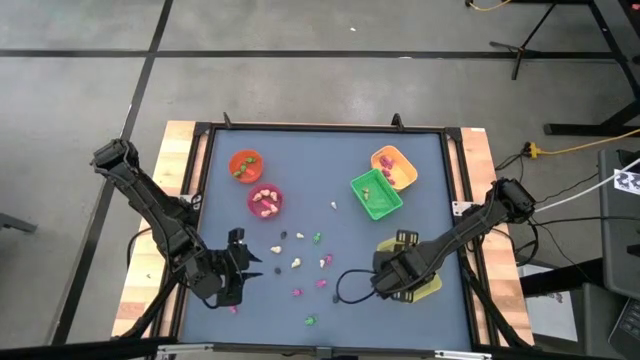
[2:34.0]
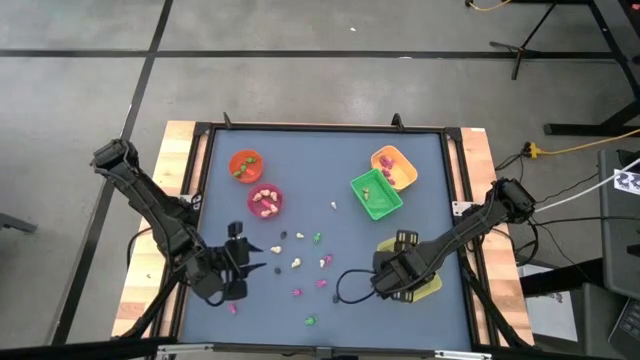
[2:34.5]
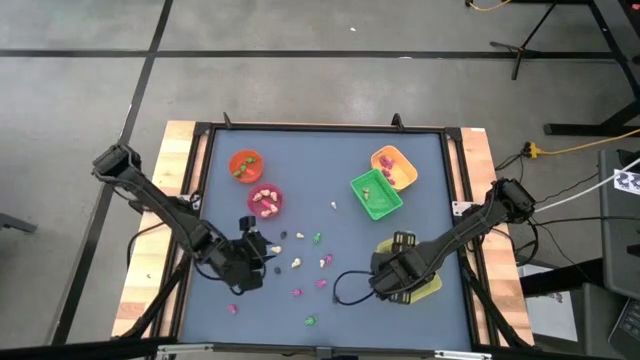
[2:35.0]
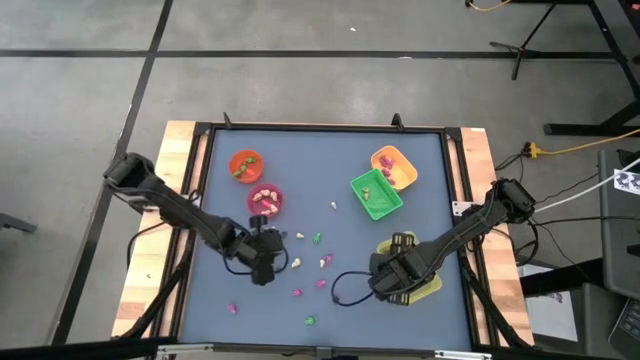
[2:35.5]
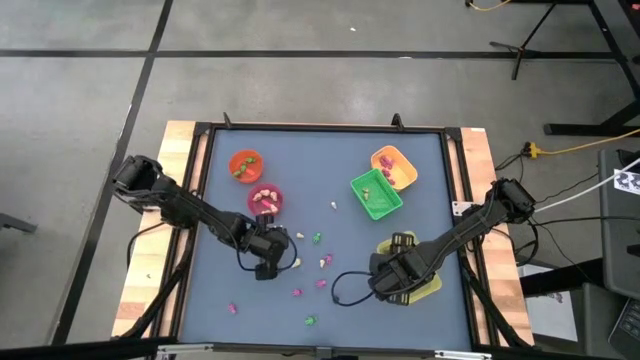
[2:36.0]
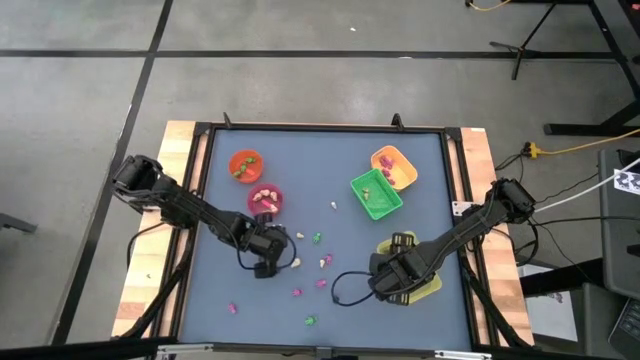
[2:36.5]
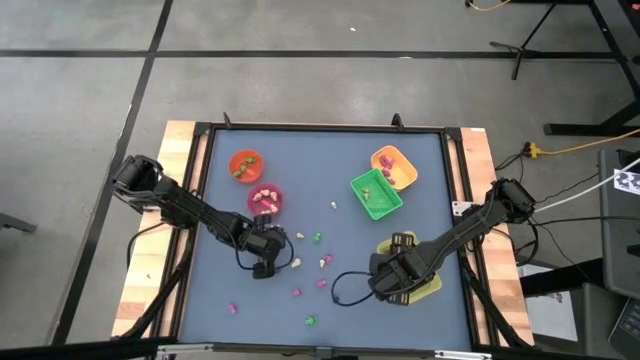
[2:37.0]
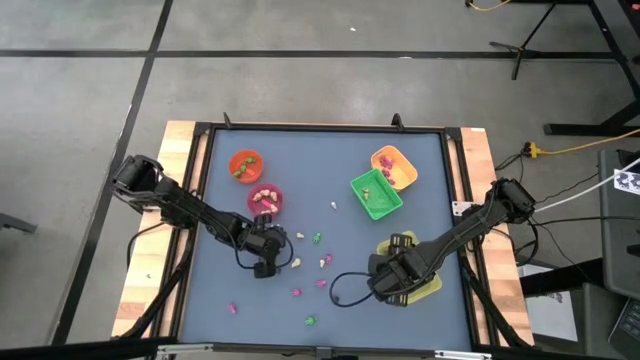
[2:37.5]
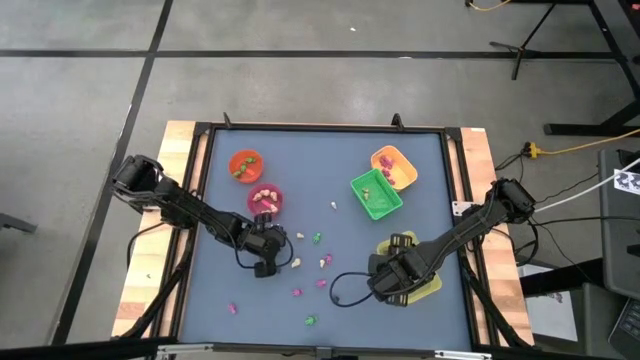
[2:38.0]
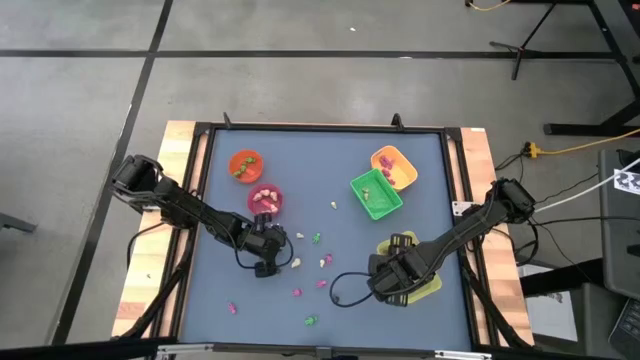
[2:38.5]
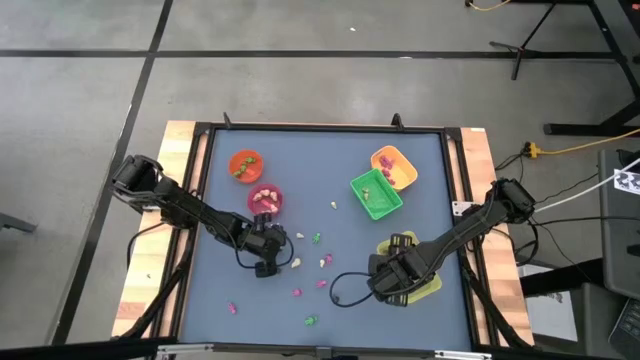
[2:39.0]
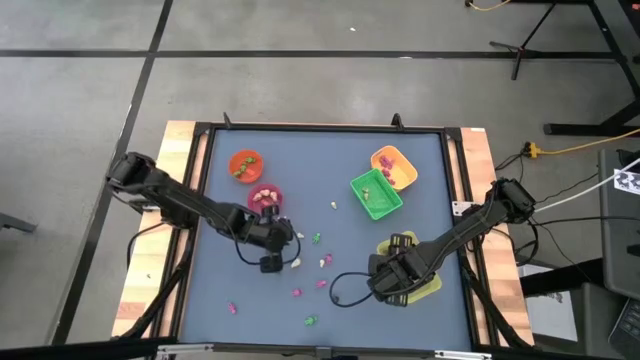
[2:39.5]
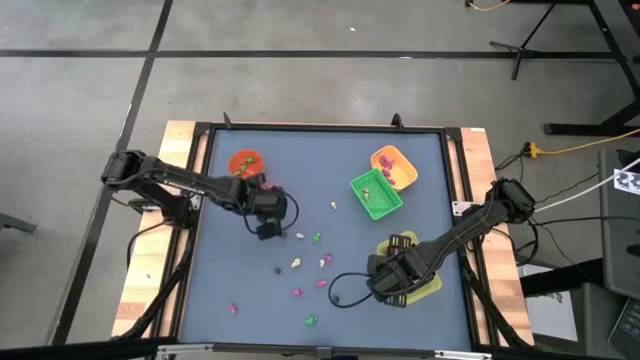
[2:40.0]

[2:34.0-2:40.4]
Task: Sort Halloween decoration
Put the white skull toy into the pink bin

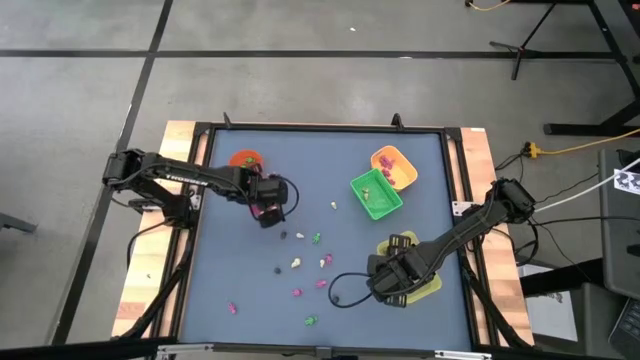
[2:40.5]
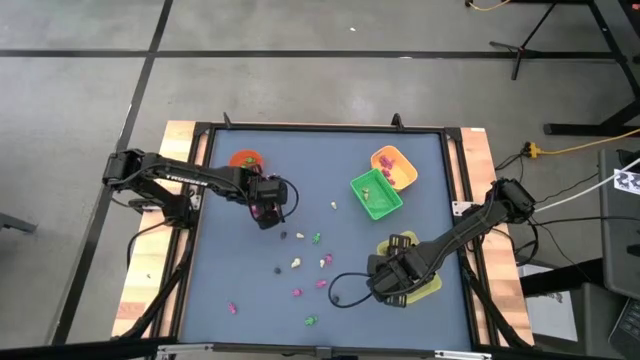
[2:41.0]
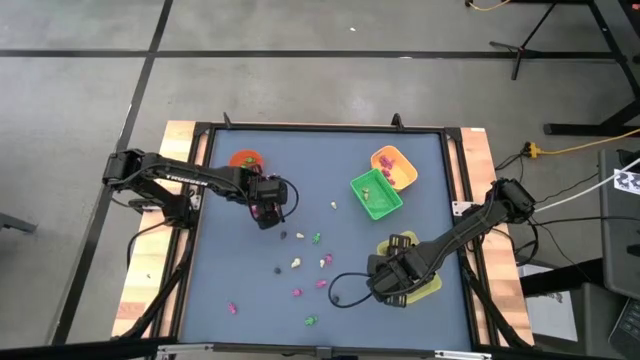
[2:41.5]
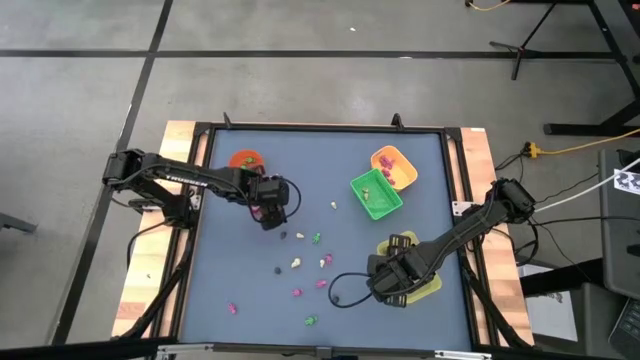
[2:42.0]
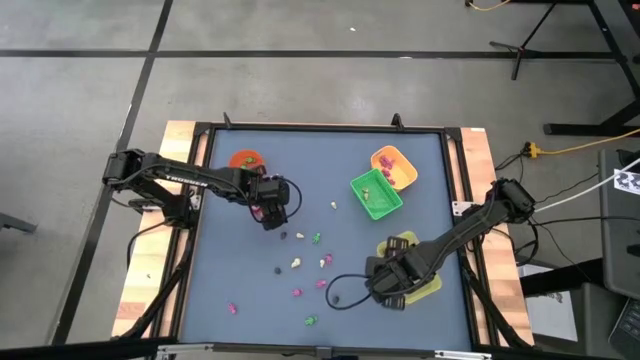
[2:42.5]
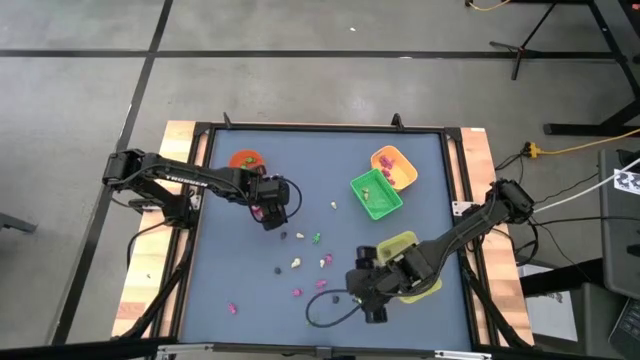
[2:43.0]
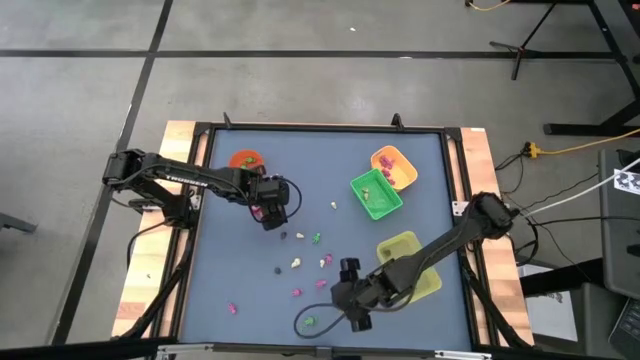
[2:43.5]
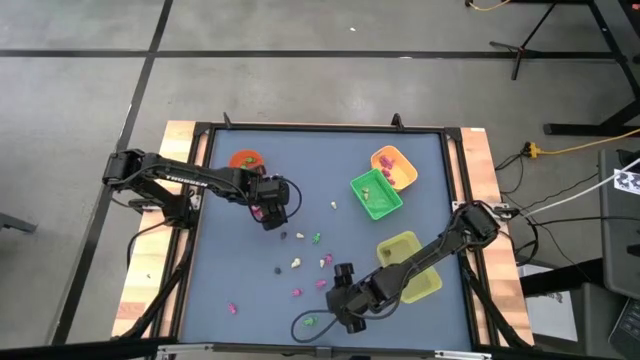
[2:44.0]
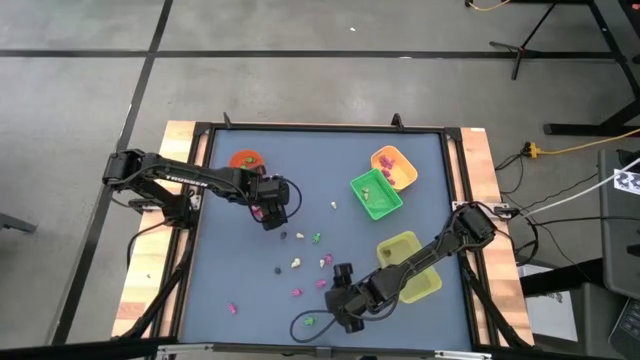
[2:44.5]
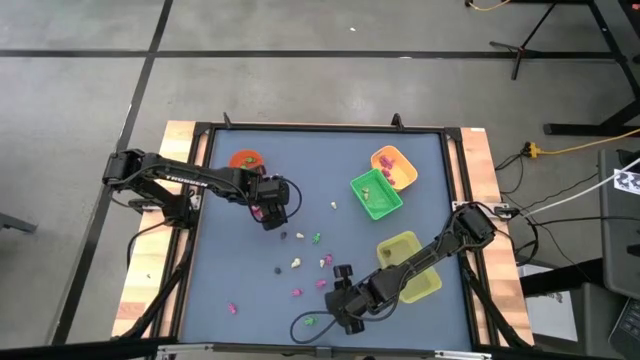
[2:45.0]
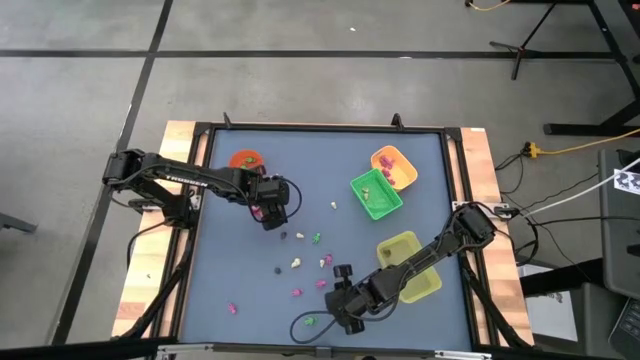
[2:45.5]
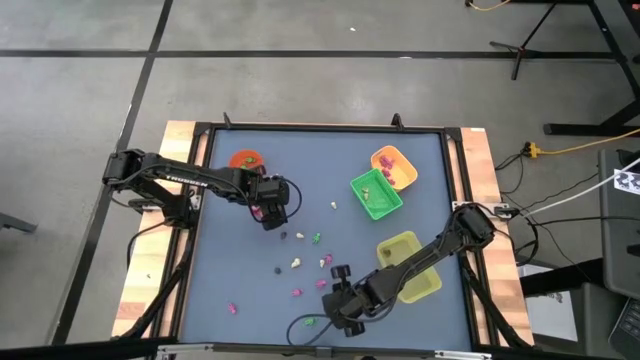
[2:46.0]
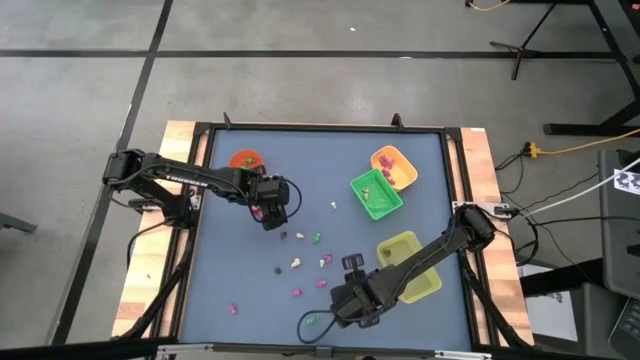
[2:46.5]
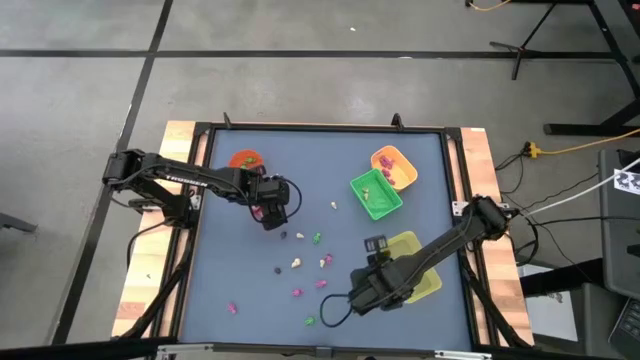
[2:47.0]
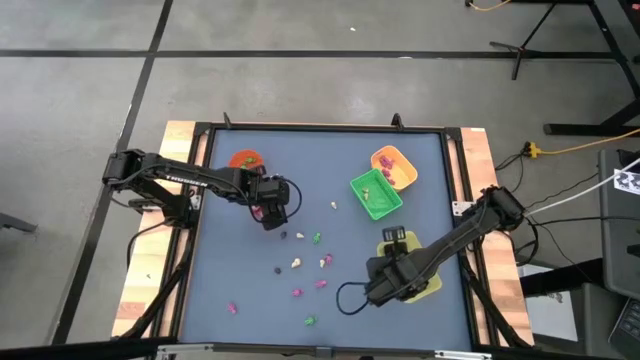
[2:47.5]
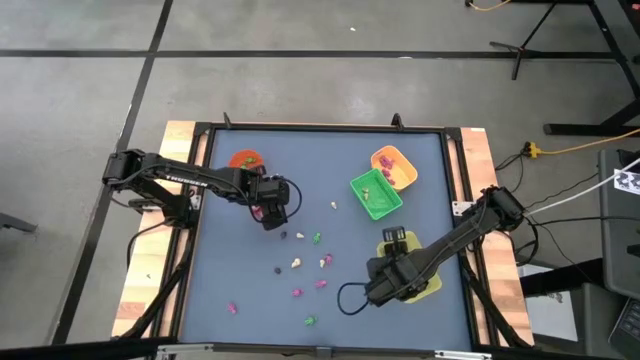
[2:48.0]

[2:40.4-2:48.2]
Put the black skull toy into the light yellow bin

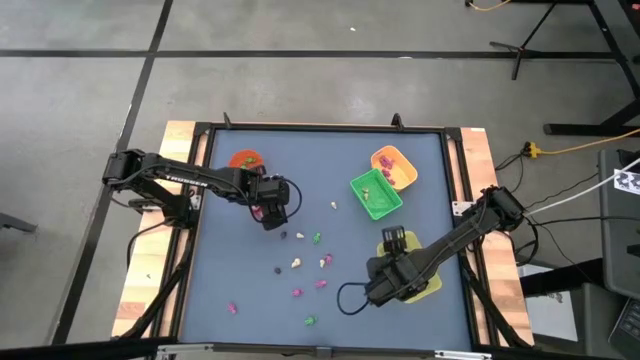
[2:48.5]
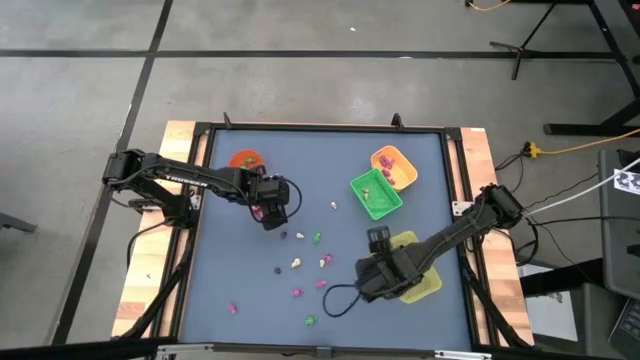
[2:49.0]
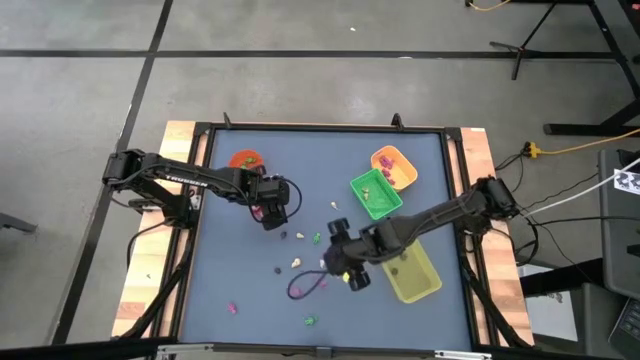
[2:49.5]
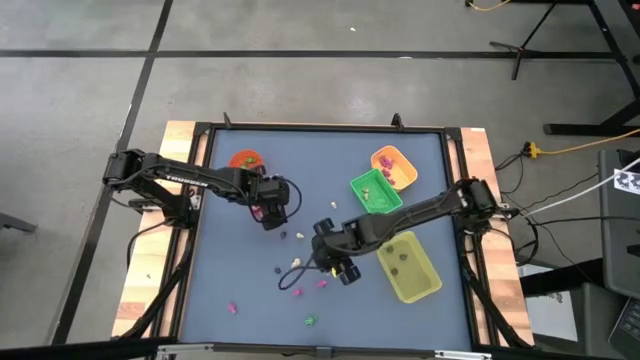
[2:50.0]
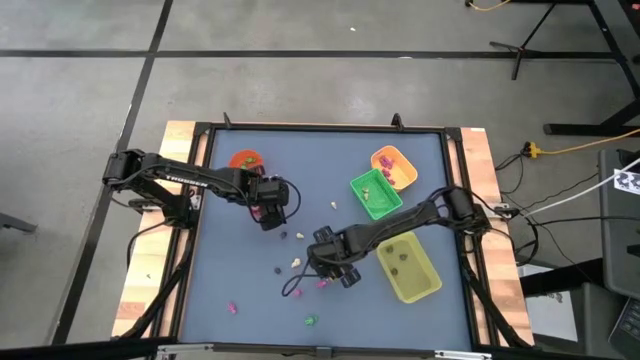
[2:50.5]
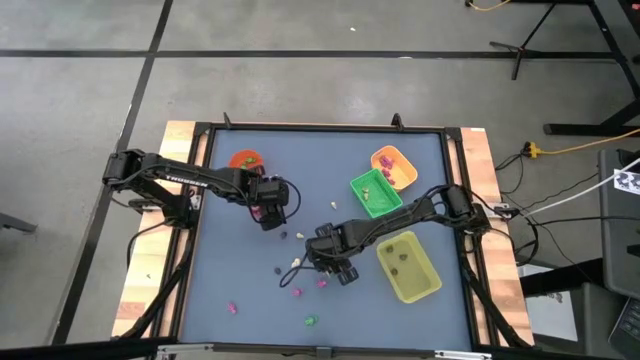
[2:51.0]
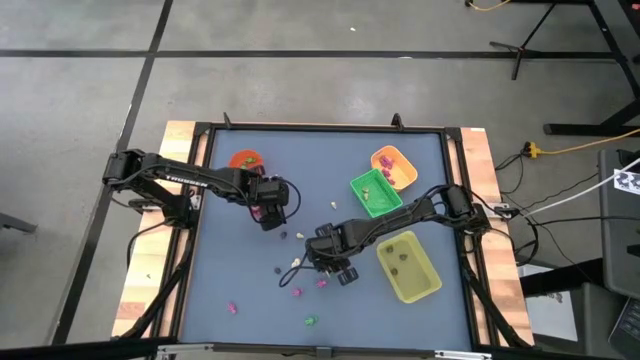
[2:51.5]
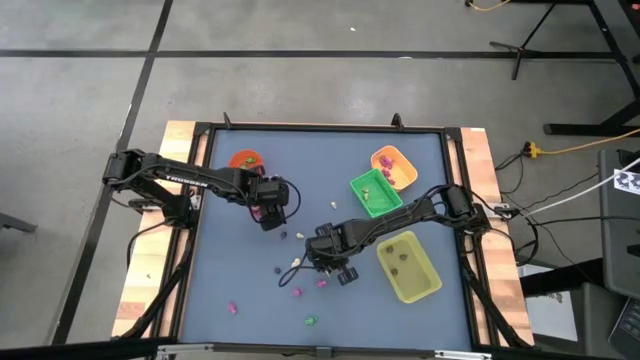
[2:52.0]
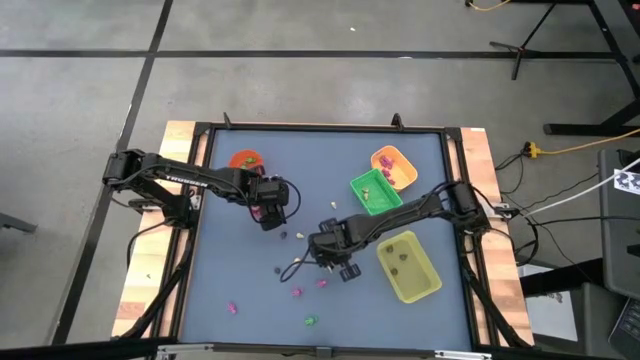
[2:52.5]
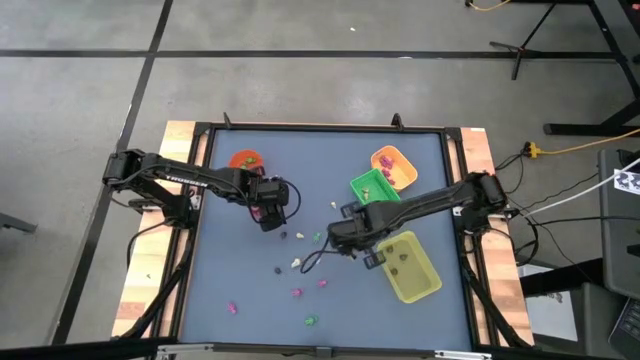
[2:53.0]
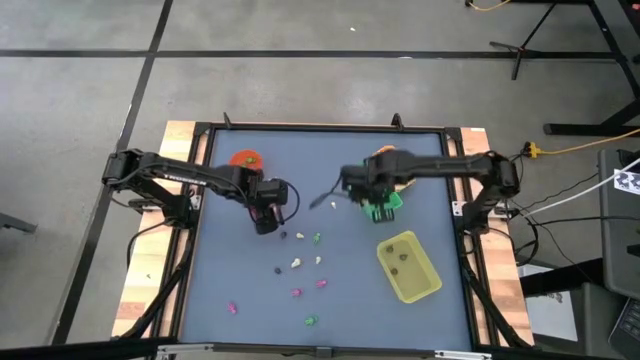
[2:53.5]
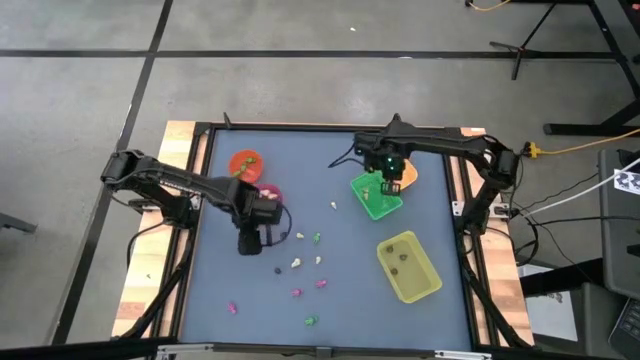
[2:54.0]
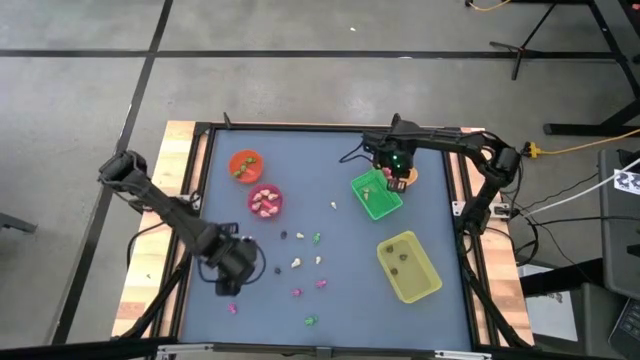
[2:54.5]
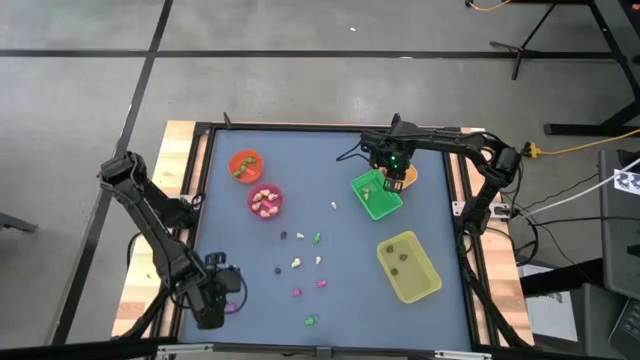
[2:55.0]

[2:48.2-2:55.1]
Put the pink skeleton toy into the yellow bin
